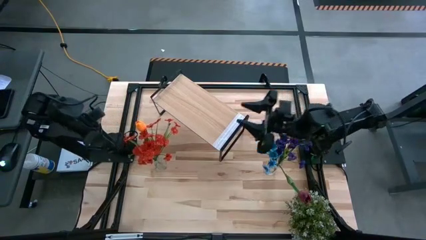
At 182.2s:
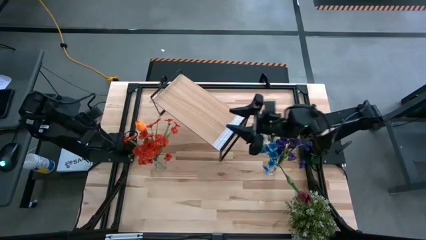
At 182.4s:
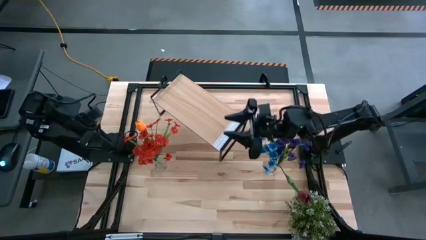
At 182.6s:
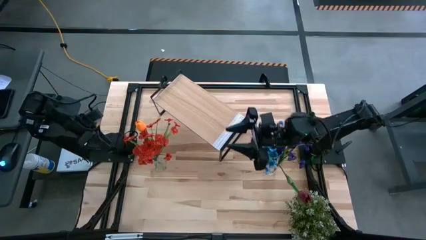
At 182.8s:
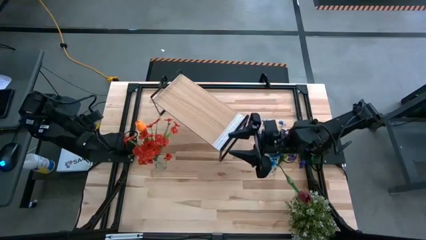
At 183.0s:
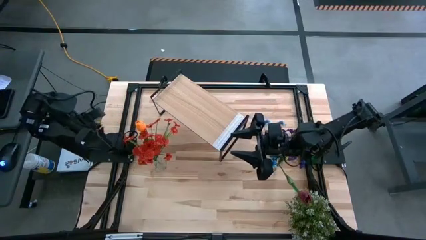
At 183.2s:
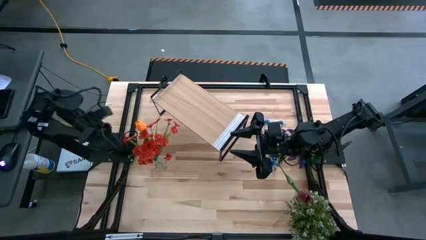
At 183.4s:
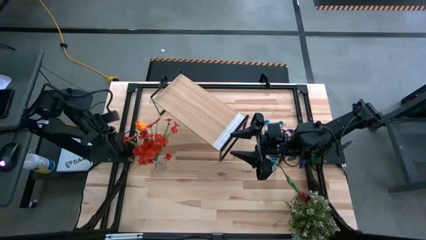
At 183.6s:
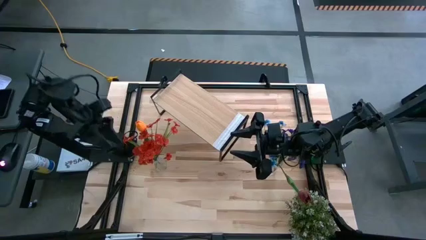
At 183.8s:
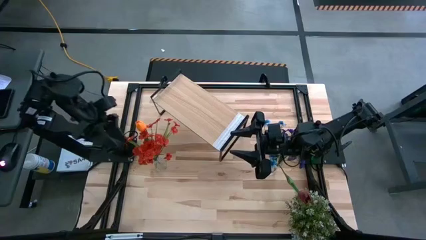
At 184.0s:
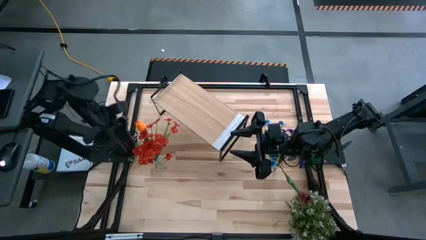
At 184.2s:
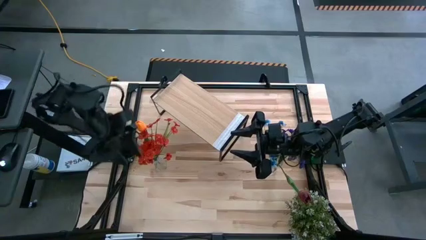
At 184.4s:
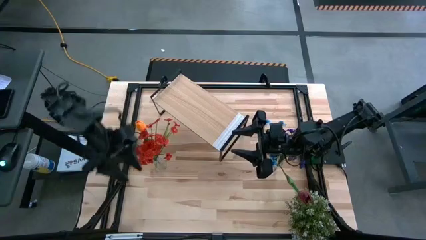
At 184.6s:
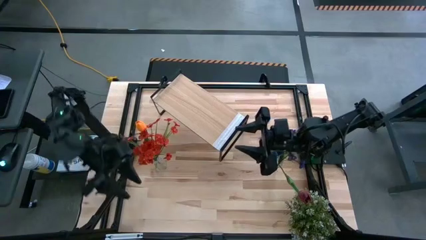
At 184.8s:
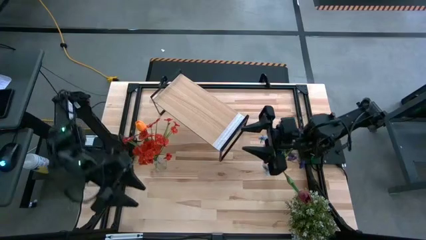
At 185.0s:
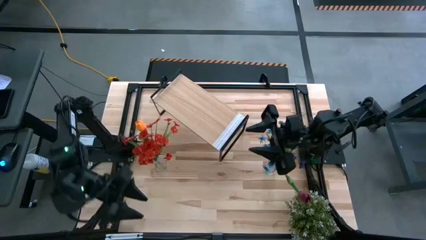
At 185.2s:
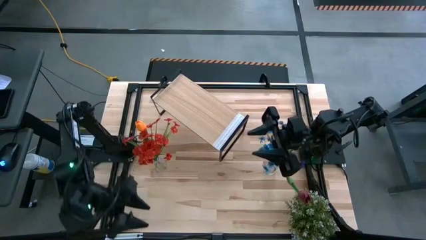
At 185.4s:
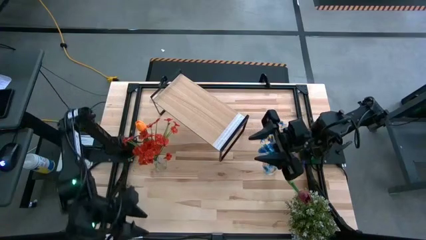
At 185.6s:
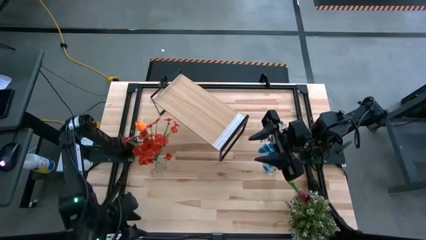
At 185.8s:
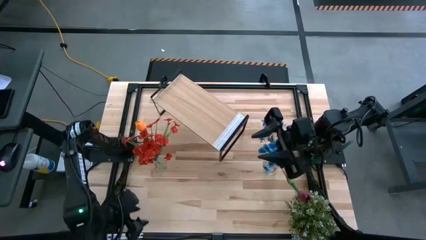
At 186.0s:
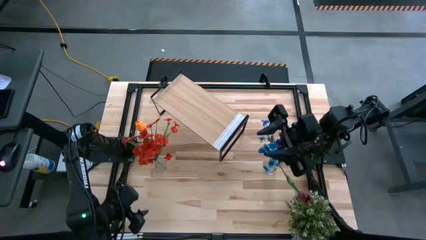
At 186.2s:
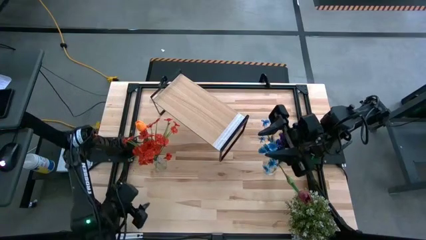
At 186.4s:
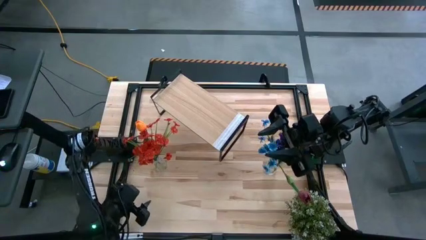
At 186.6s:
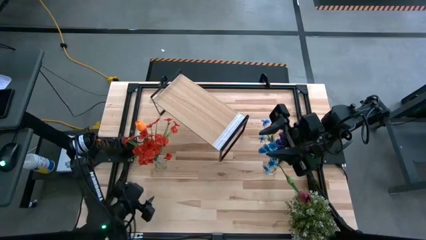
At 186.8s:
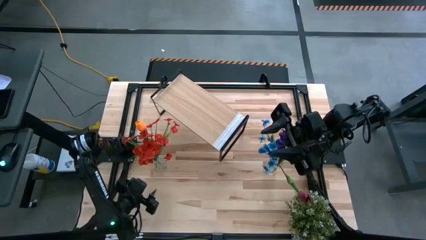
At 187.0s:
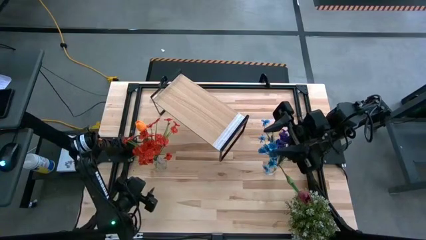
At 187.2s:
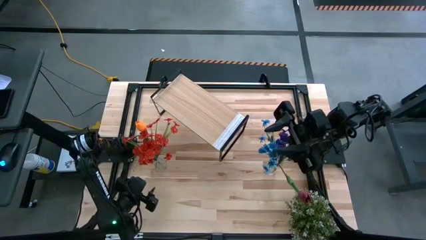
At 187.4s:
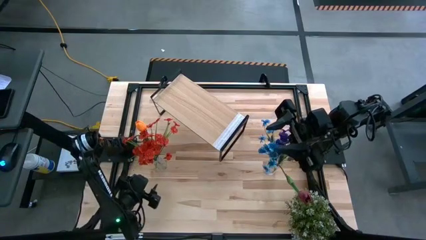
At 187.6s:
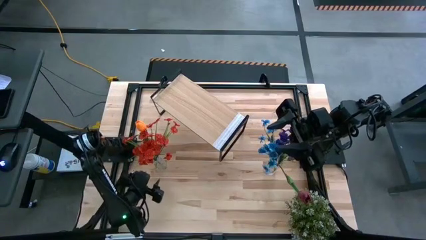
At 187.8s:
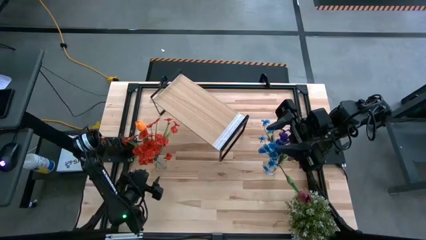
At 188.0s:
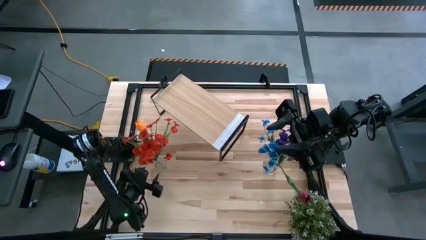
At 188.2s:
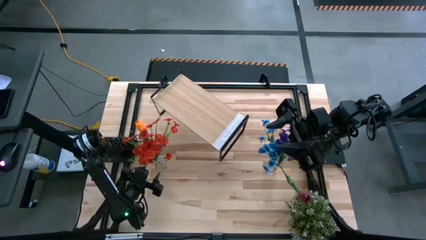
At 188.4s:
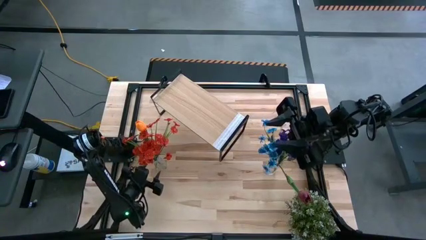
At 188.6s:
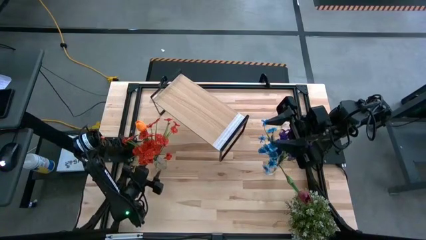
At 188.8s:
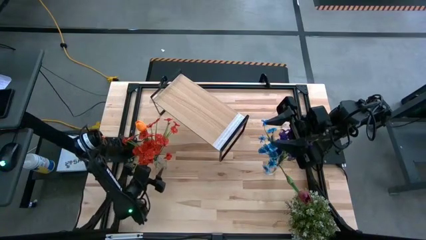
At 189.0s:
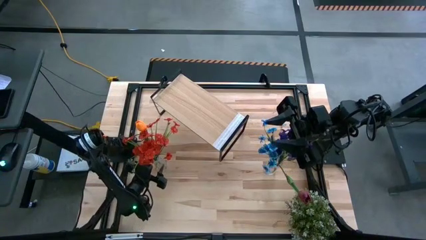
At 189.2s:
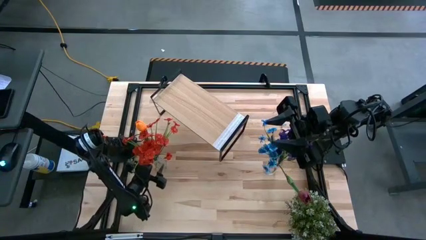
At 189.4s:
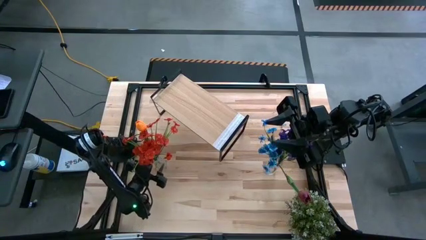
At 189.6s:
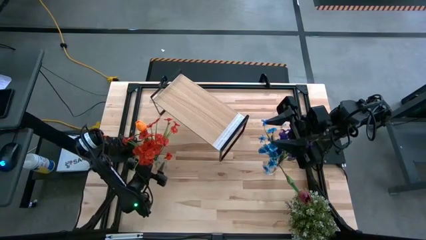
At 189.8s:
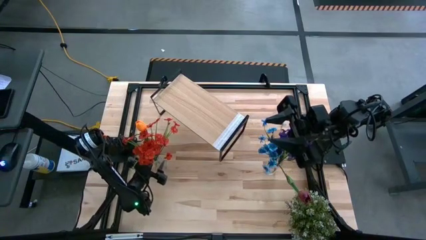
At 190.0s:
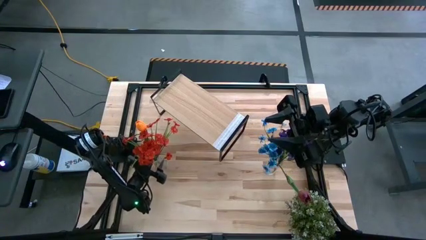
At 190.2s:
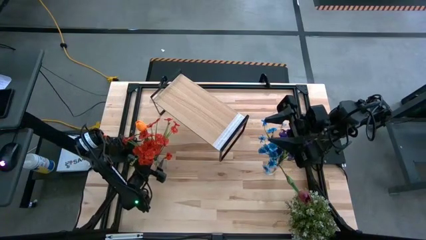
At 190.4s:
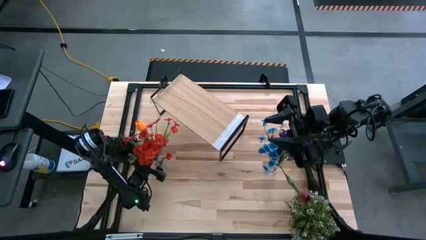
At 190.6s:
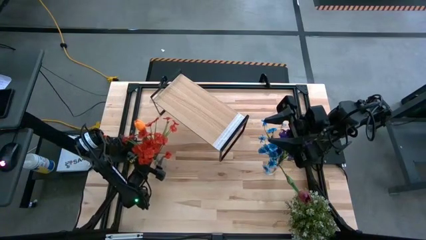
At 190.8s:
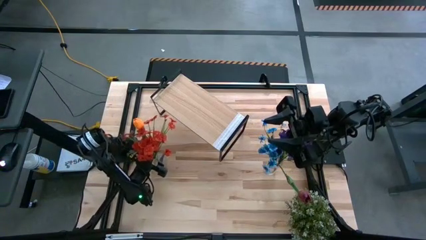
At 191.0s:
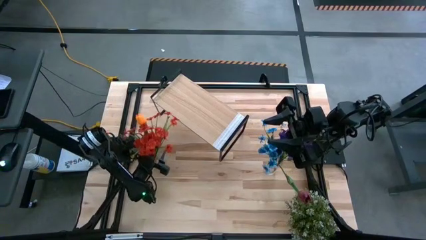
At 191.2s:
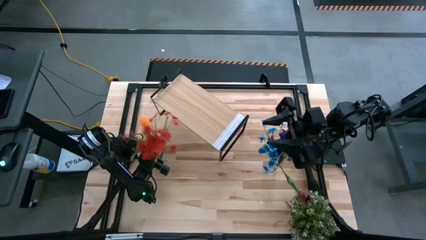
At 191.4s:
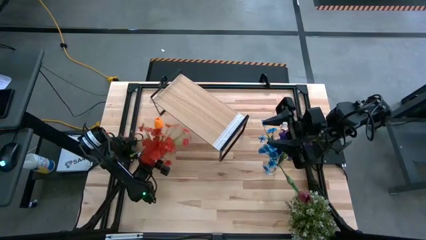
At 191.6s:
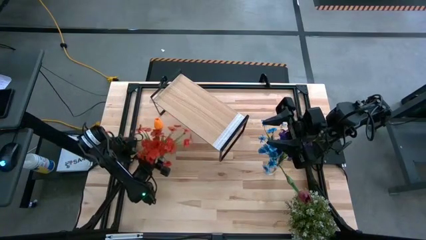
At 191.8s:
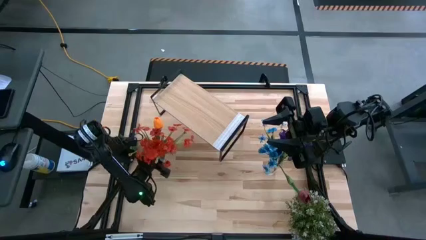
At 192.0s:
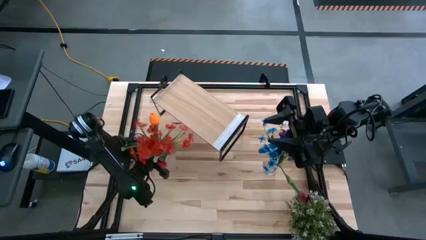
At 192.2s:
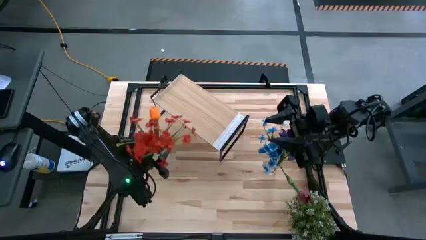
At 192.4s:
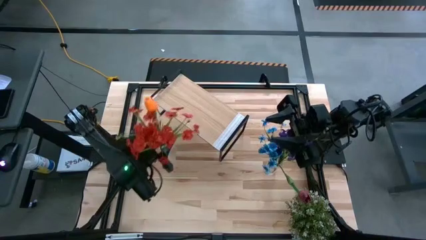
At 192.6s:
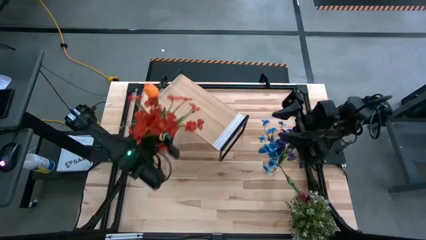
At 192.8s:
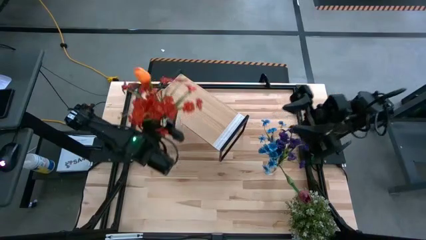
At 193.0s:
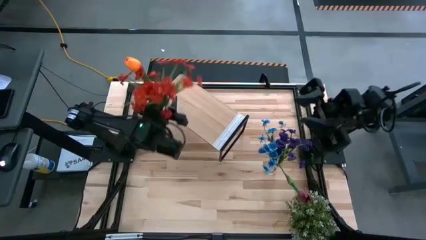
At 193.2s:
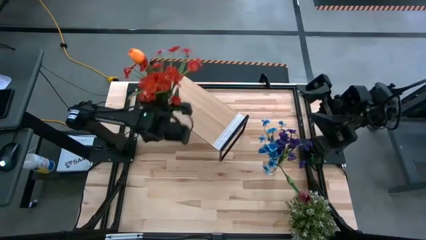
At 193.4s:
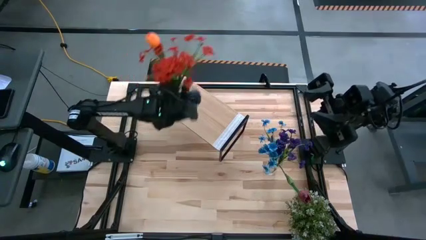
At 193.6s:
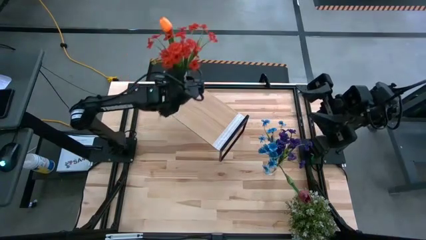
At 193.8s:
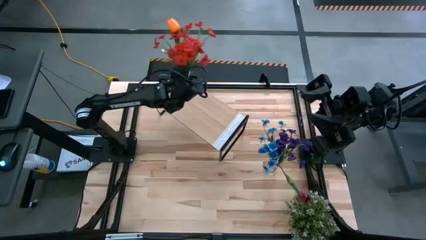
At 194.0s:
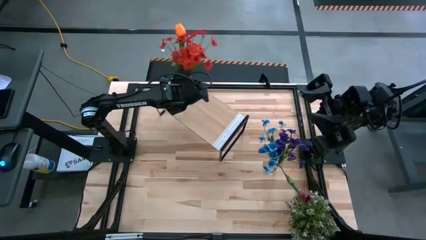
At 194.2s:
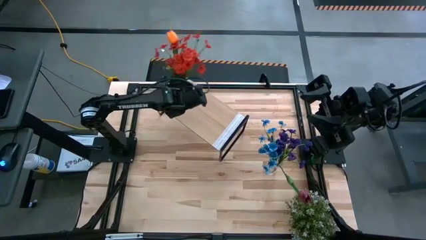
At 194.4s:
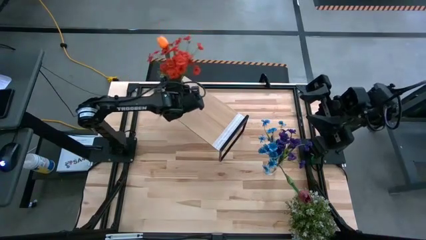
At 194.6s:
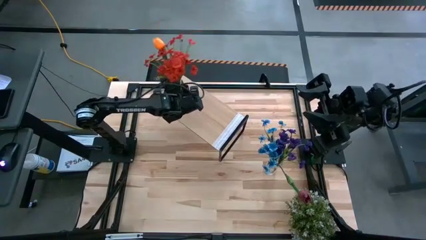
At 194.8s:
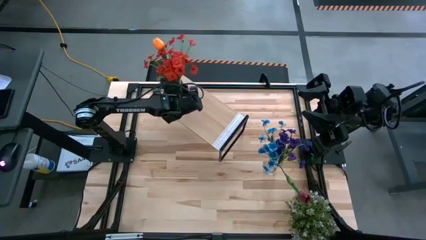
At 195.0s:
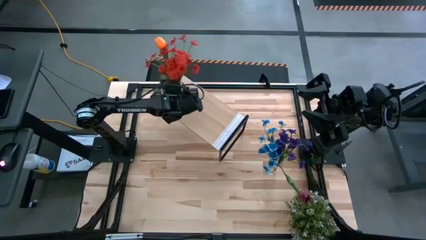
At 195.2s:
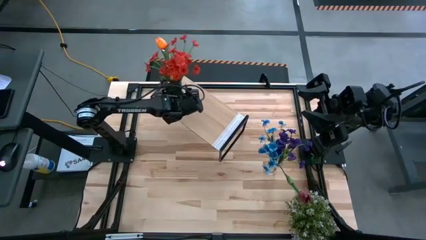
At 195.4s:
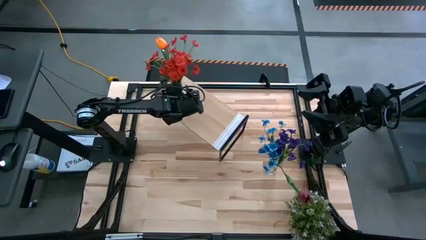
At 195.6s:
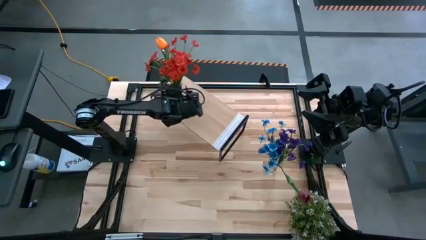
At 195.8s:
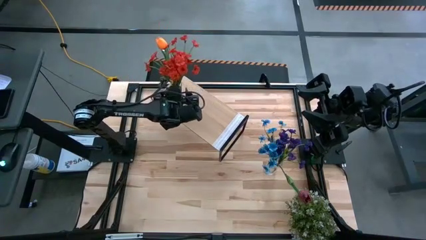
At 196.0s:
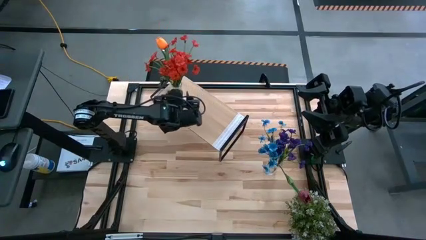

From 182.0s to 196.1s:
Task: Pick and place flowers into a vace then onto a shelf
Put the left transparent vase on the shelf

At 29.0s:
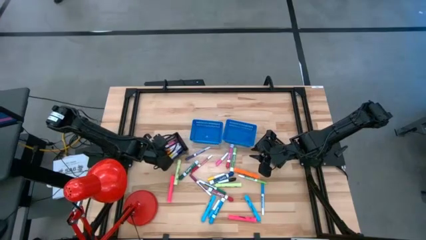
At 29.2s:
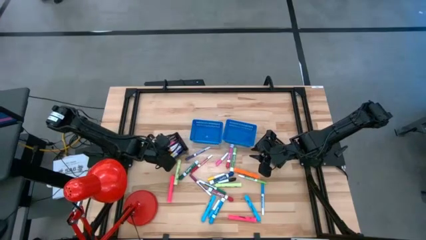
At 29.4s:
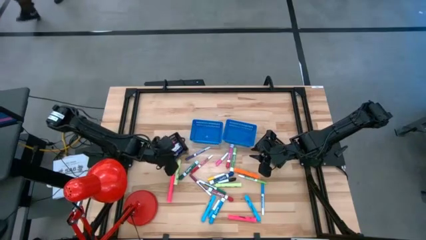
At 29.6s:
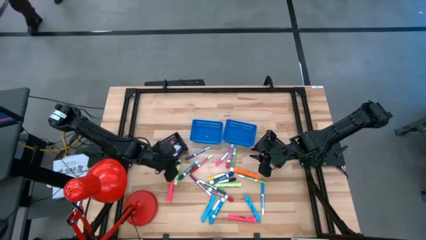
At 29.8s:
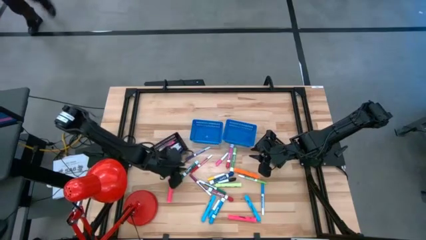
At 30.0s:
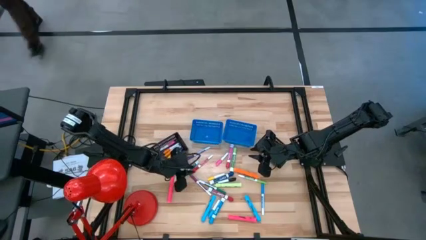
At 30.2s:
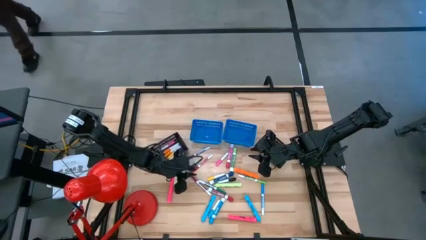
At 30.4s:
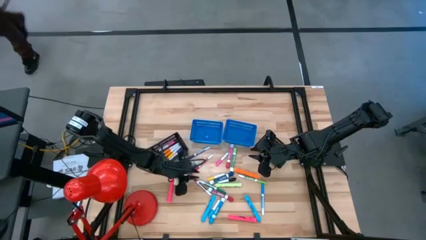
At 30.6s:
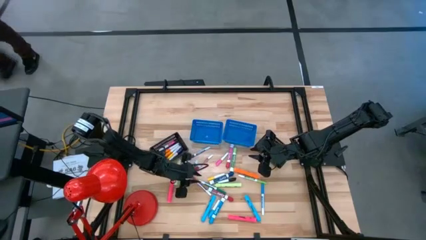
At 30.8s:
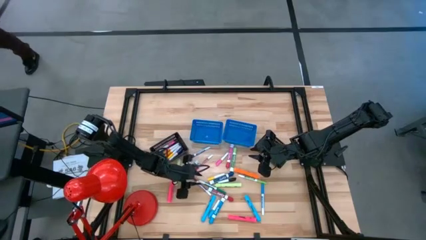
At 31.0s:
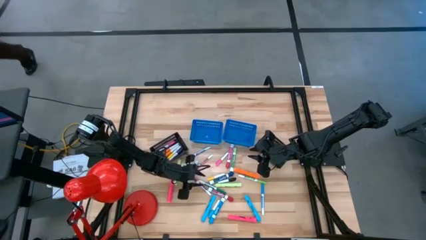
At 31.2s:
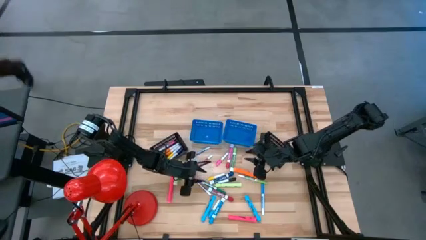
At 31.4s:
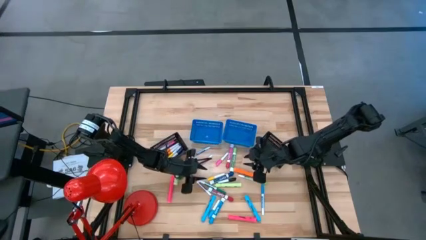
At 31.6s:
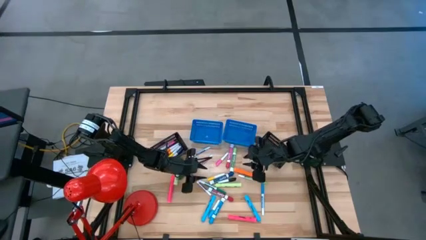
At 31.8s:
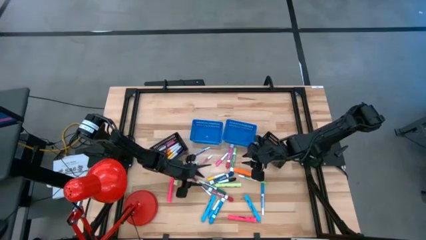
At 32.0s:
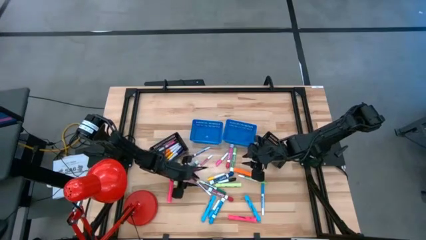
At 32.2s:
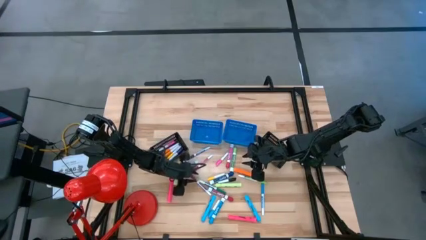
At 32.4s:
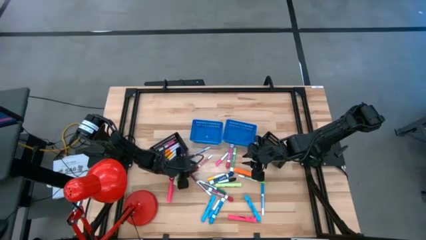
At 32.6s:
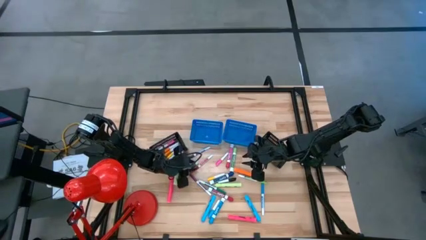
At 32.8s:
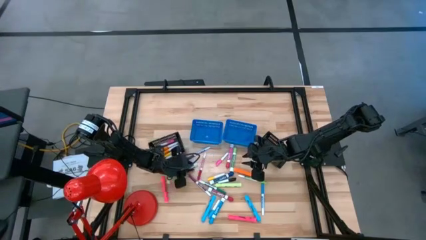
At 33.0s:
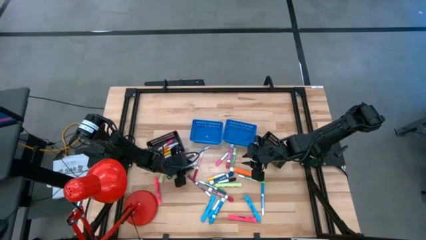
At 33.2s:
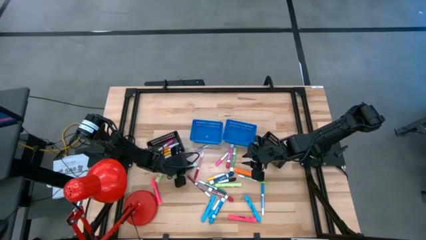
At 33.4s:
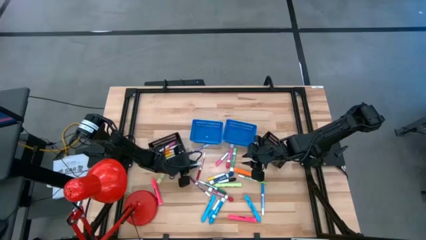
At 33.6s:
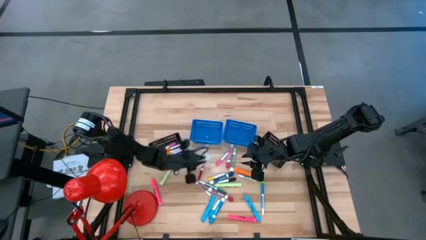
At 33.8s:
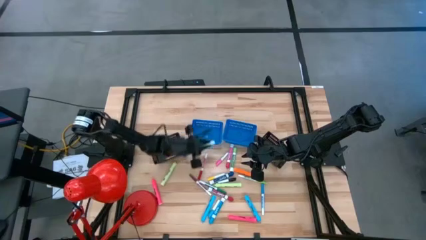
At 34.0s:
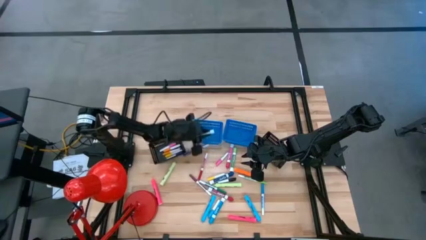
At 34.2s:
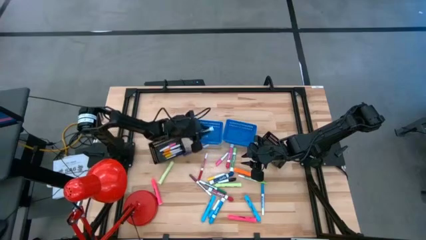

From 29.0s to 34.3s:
Task: Pick & Place Markers
Put the dark green solvent marker into the left blue bin
